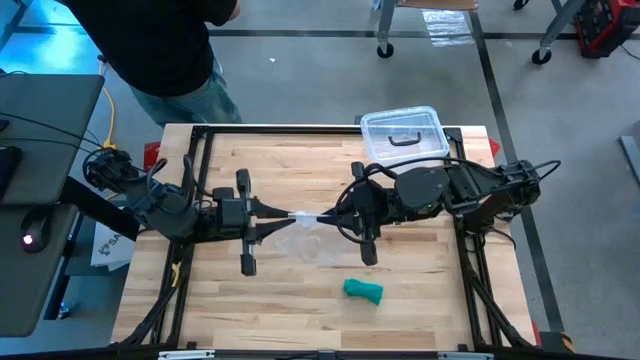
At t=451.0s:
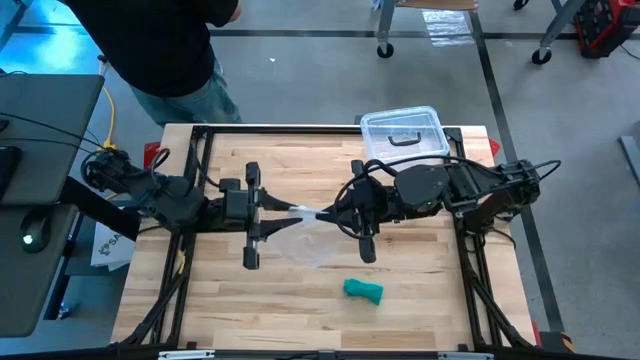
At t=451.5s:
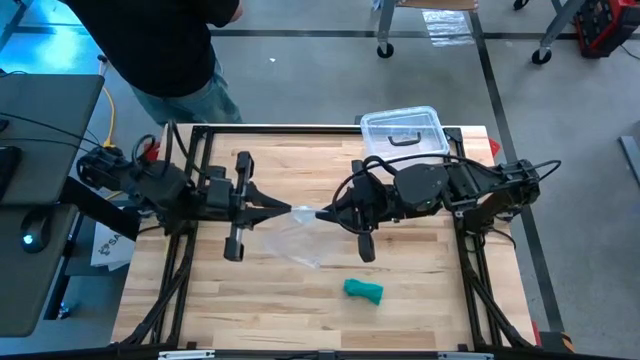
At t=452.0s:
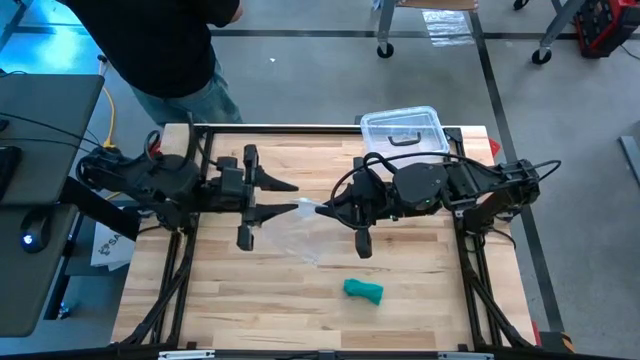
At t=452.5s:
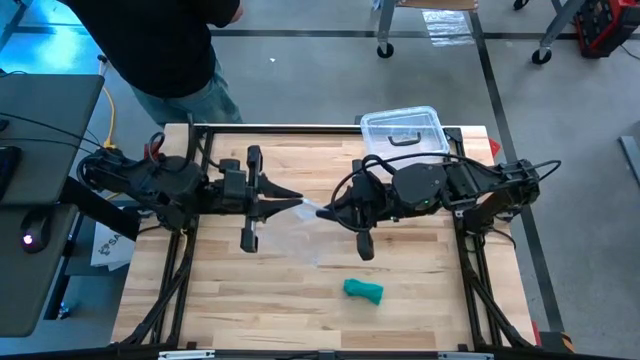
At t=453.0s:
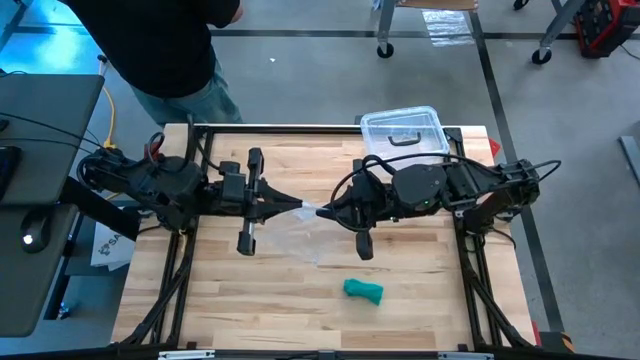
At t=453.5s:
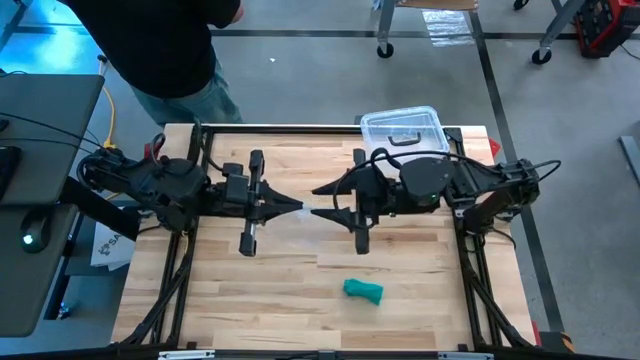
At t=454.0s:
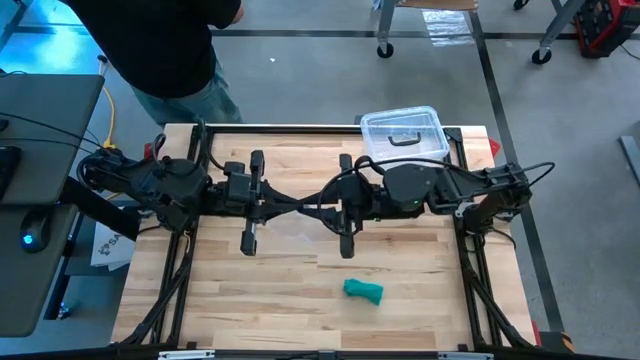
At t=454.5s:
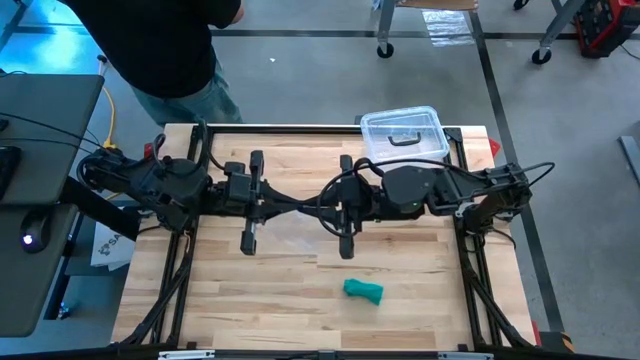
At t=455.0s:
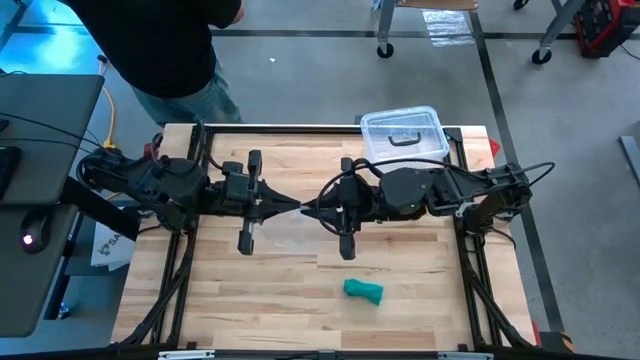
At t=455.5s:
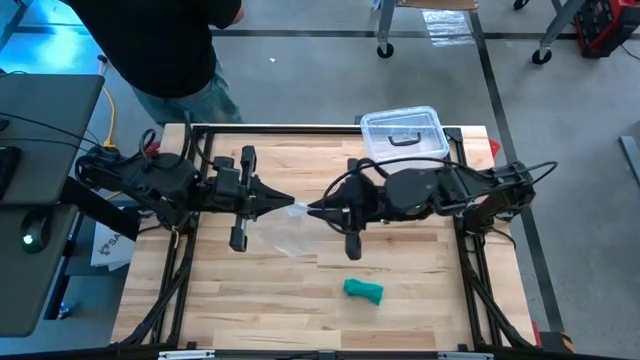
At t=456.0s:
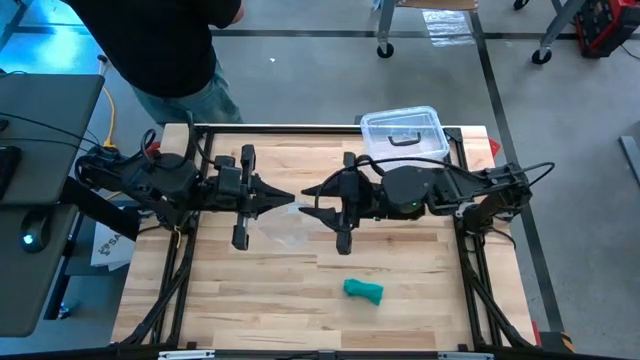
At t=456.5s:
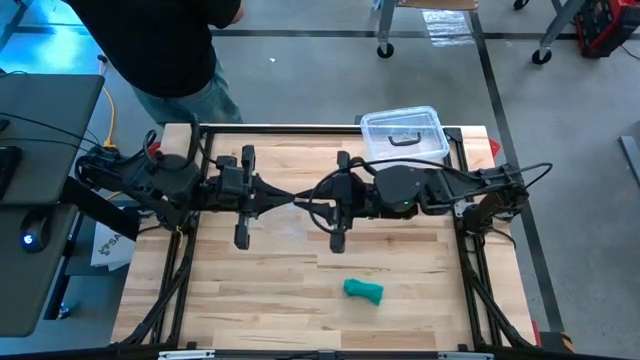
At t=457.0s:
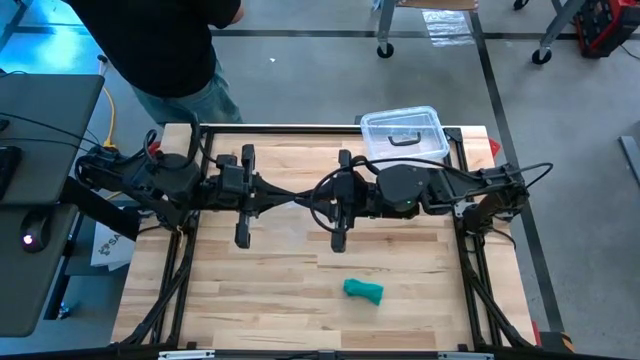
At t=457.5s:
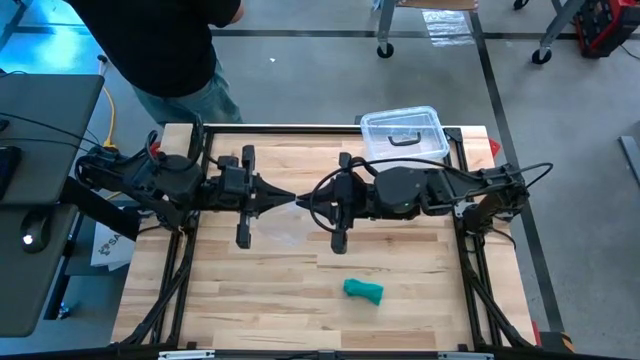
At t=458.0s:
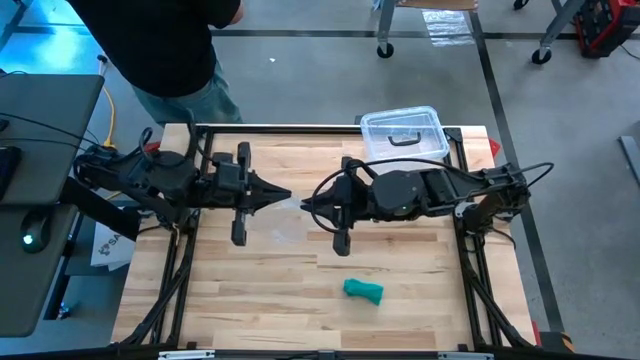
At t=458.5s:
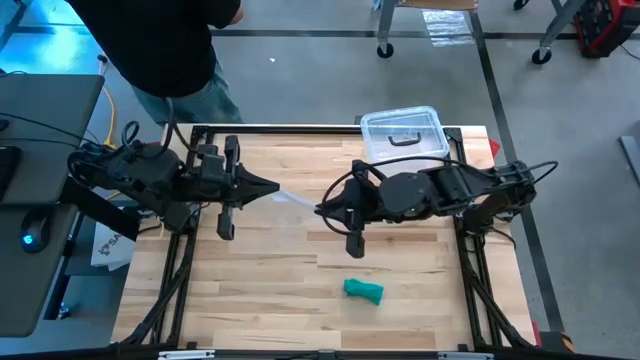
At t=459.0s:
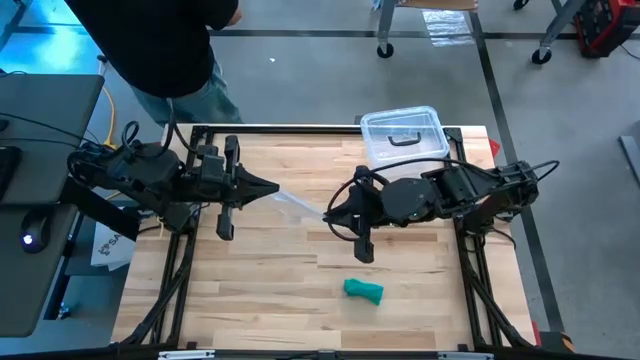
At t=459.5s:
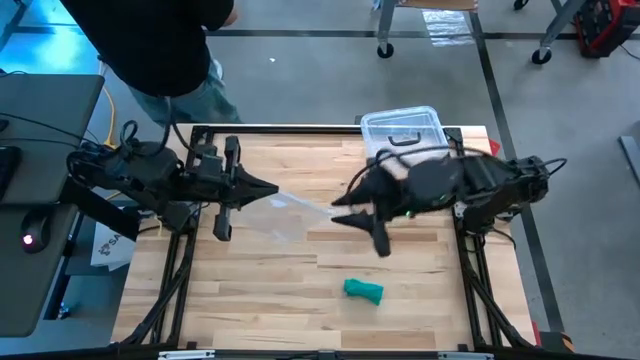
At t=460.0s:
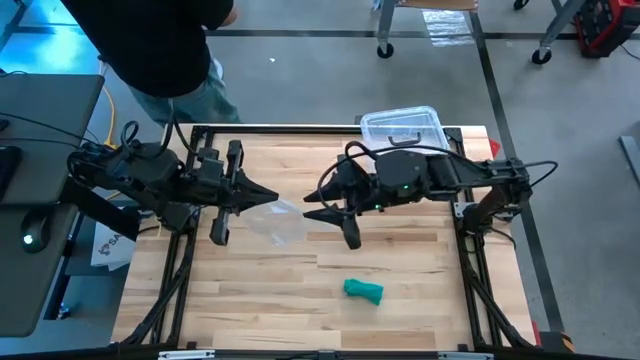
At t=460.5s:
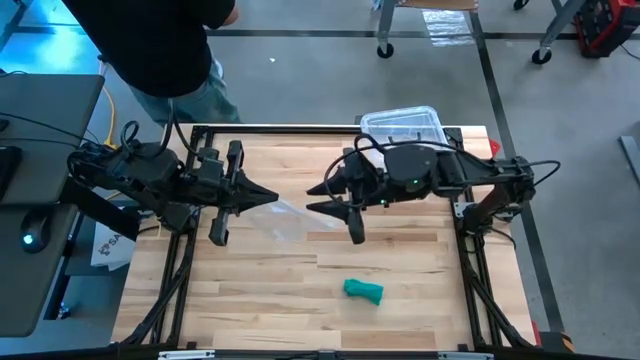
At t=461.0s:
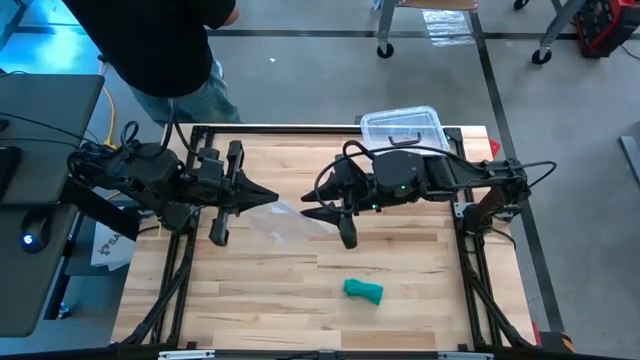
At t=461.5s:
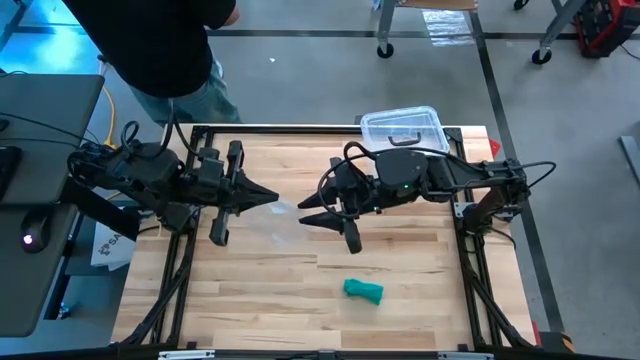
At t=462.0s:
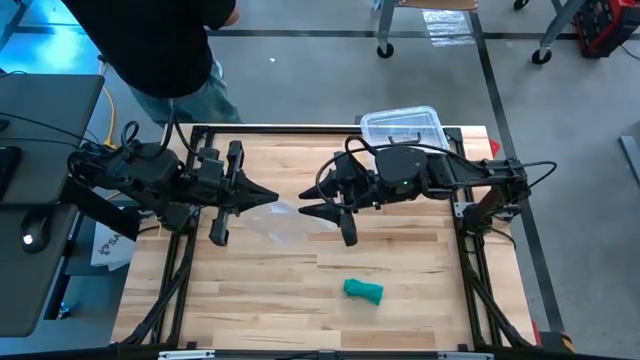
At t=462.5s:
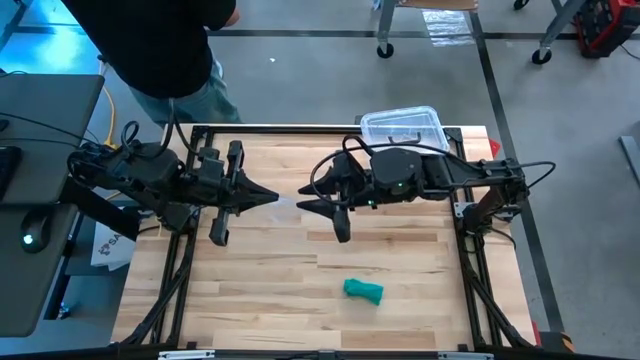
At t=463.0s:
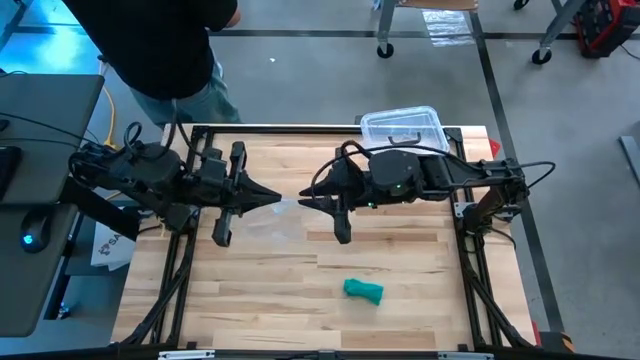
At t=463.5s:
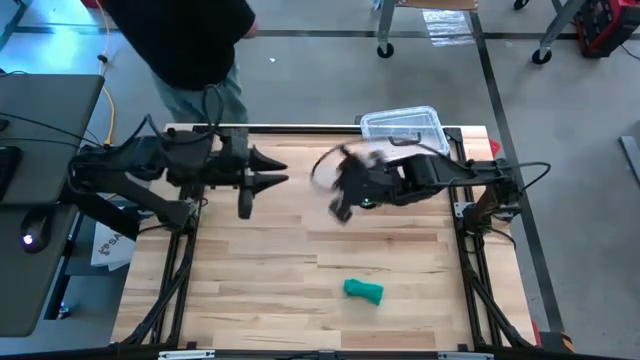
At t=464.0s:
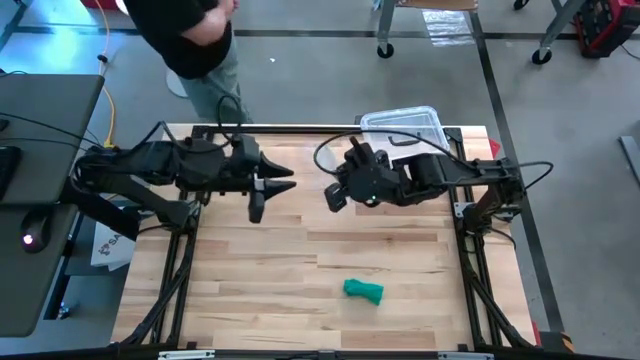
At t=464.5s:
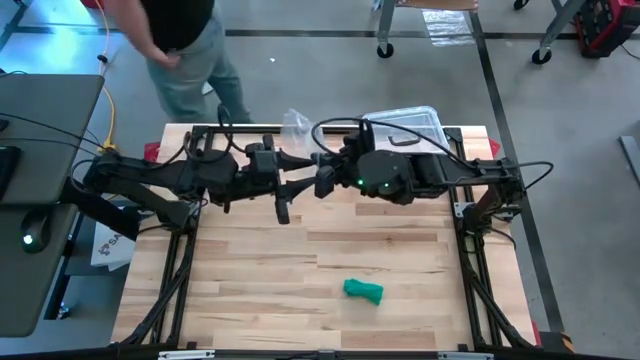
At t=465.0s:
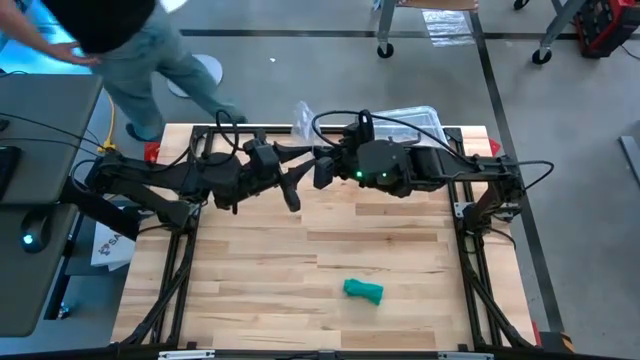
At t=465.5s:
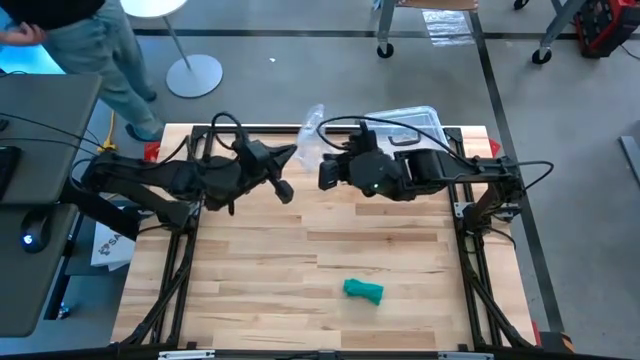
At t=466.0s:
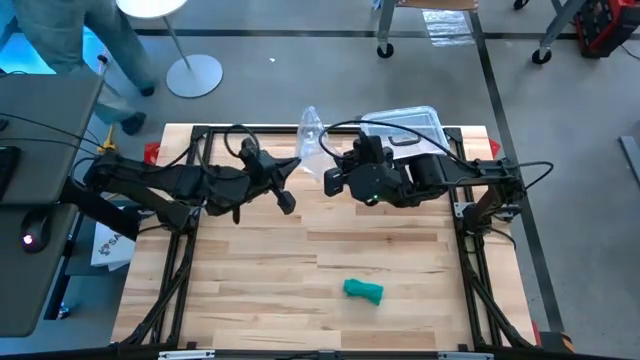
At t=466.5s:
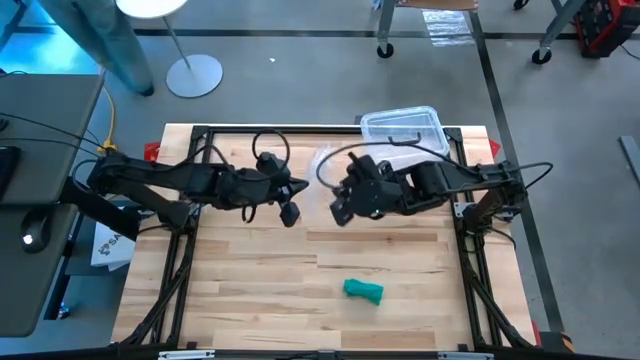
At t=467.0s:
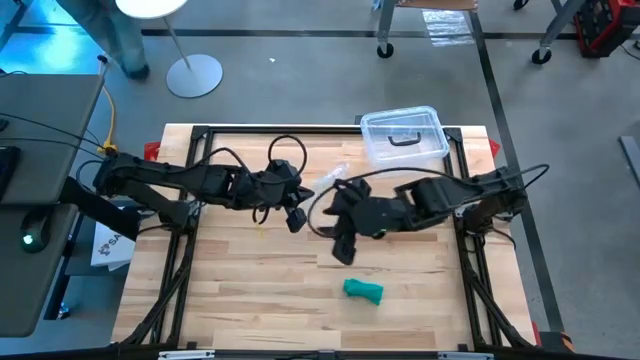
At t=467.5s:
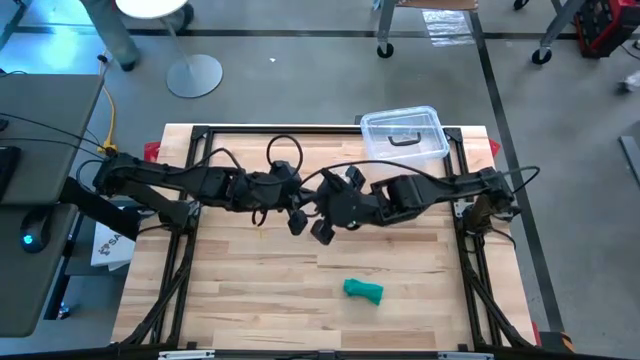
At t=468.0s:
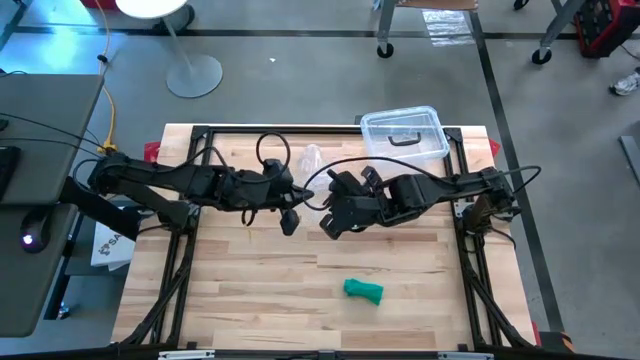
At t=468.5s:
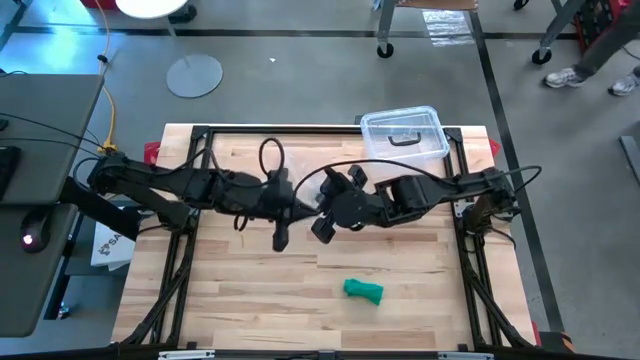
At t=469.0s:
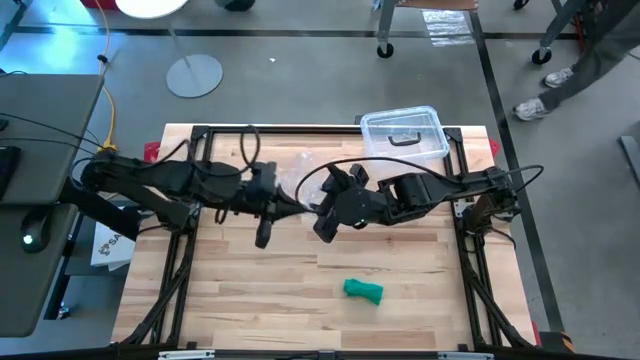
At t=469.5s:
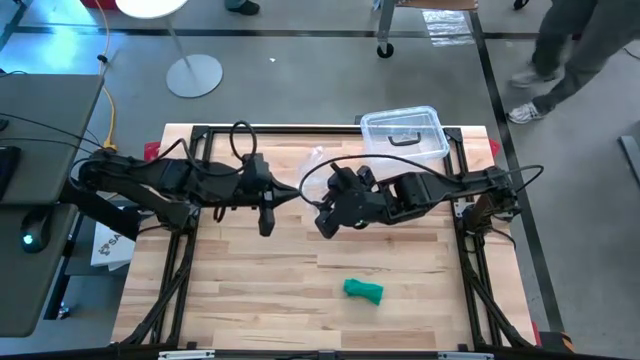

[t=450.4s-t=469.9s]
Task: Roll bandage
Open the transparent zip bag

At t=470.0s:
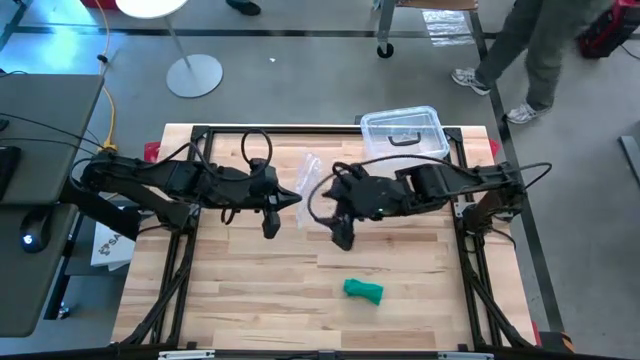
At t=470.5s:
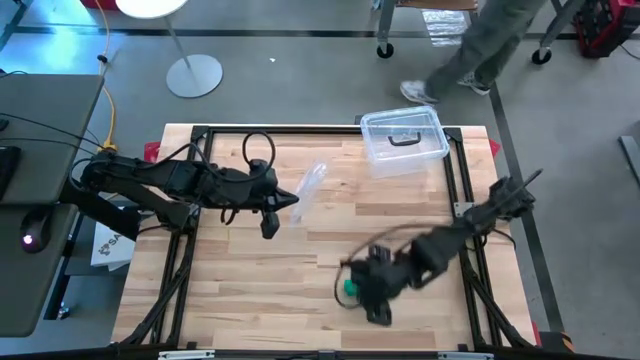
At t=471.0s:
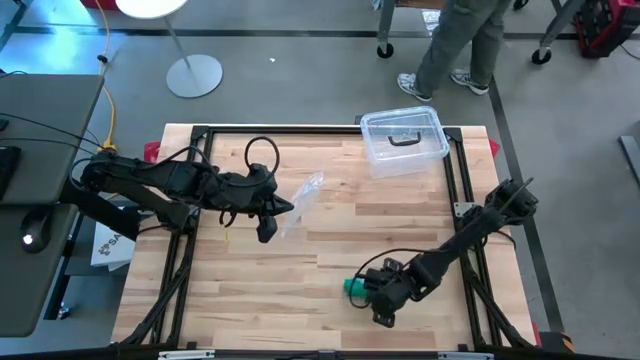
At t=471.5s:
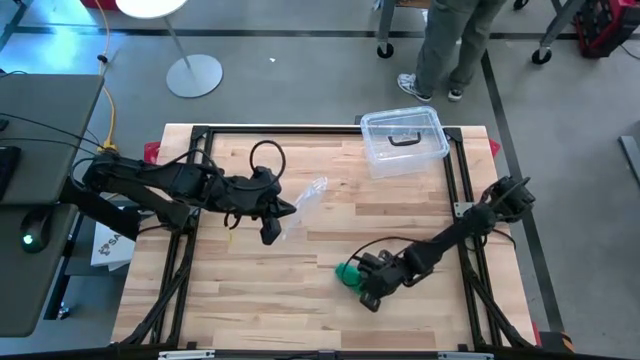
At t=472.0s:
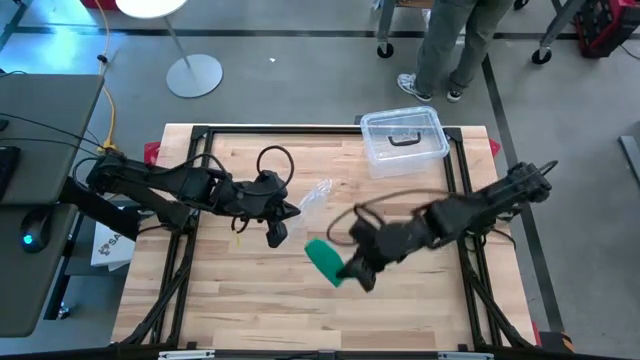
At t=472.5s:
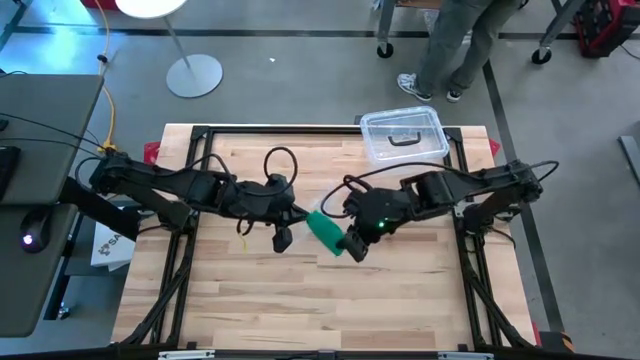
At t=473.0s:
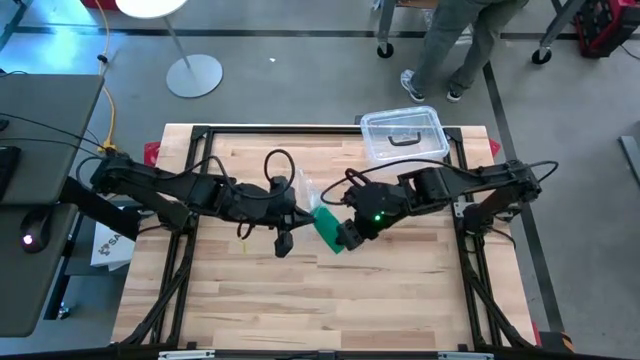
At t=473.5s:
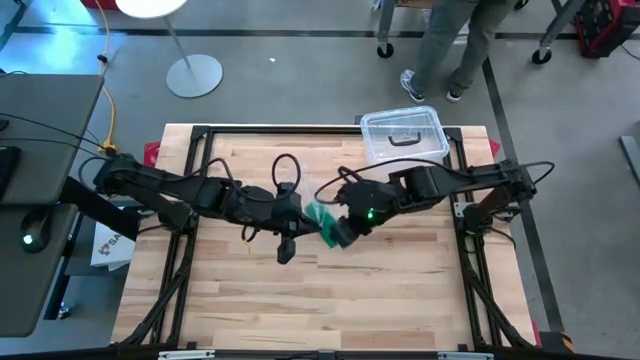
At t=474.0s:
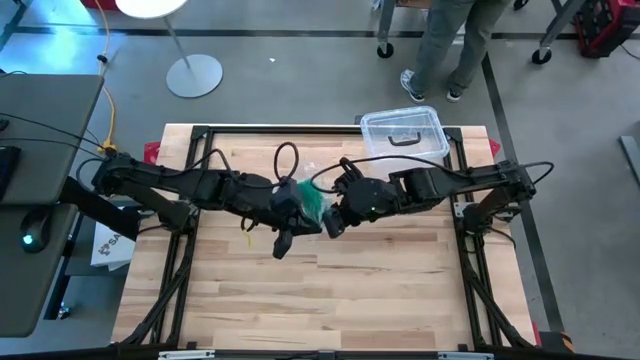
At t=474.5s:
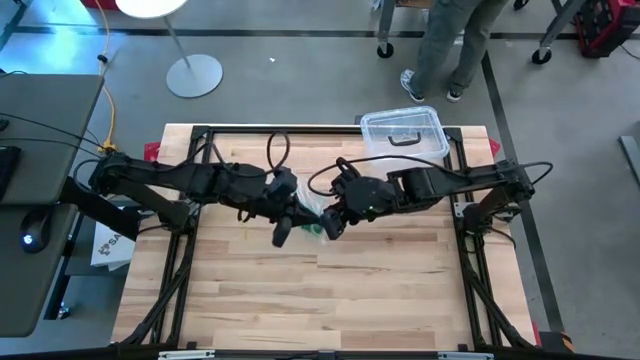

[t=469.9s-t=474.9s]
Put the rolled green bandage into the transparent zip bag
